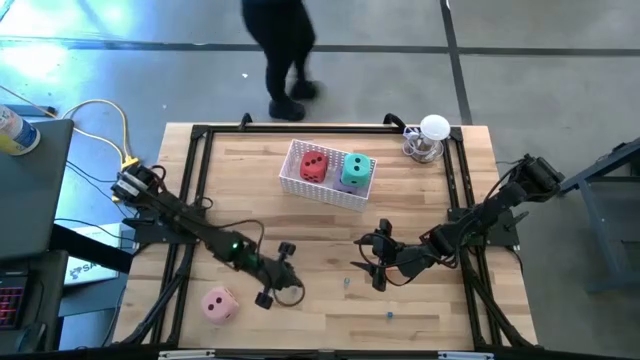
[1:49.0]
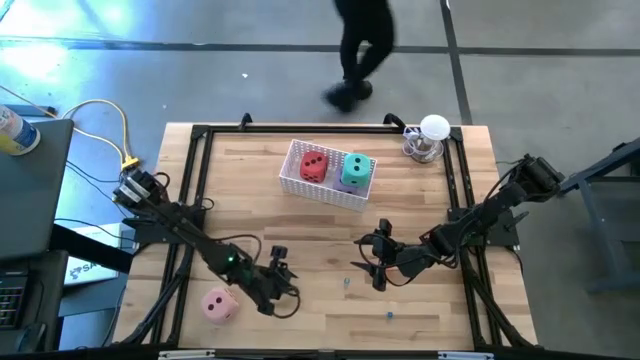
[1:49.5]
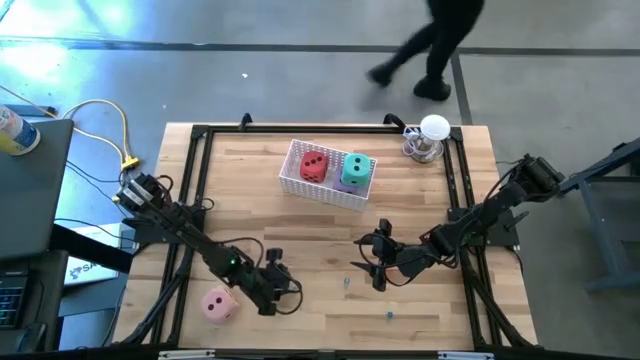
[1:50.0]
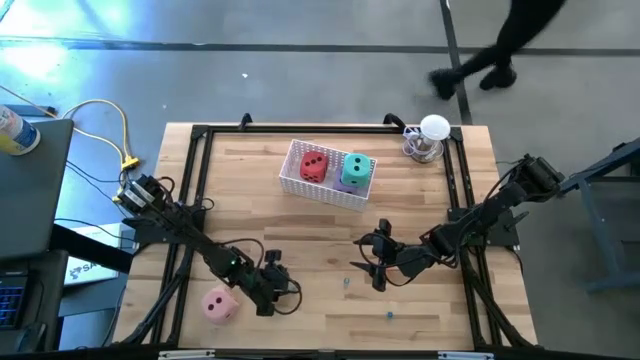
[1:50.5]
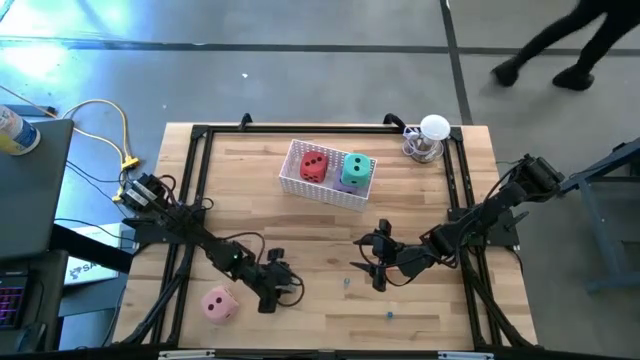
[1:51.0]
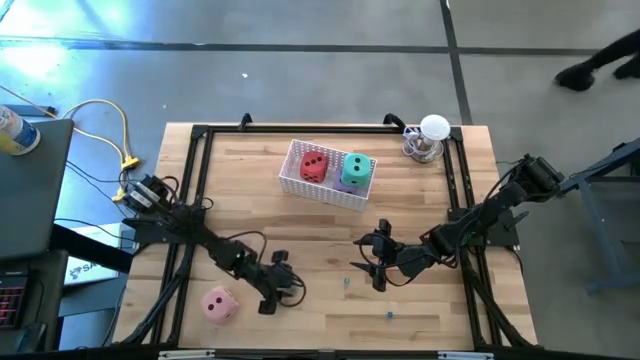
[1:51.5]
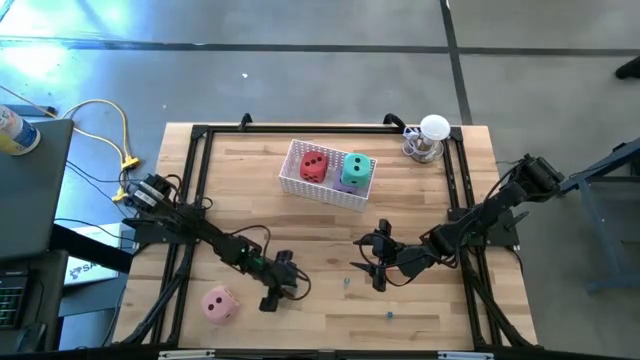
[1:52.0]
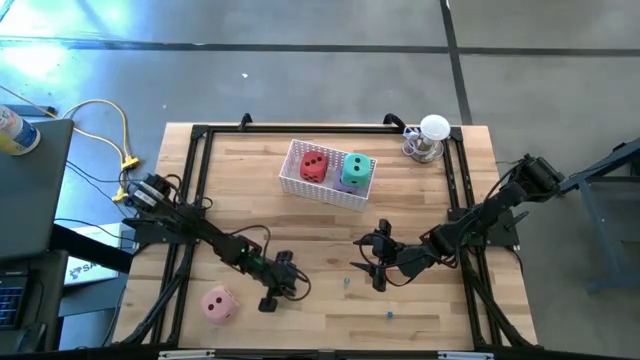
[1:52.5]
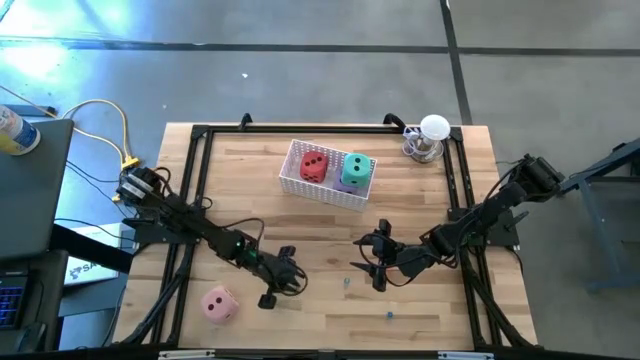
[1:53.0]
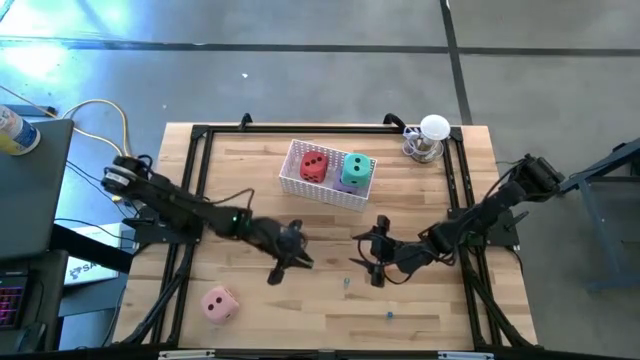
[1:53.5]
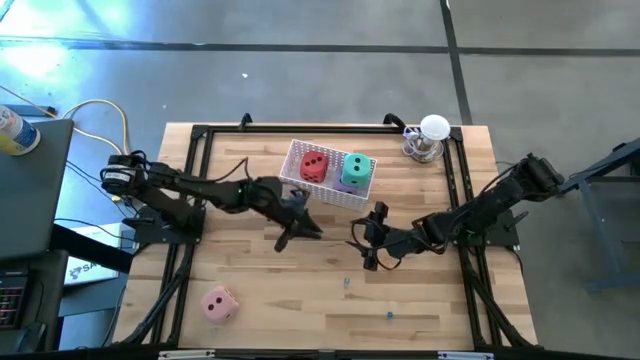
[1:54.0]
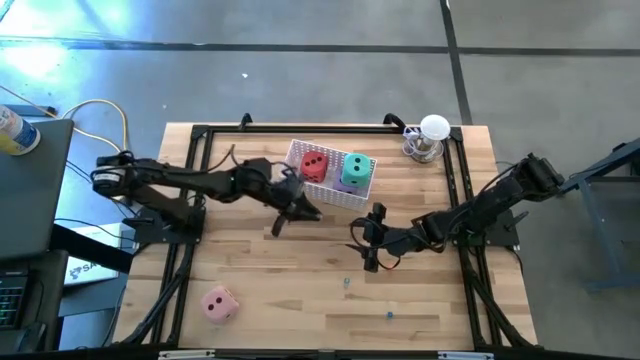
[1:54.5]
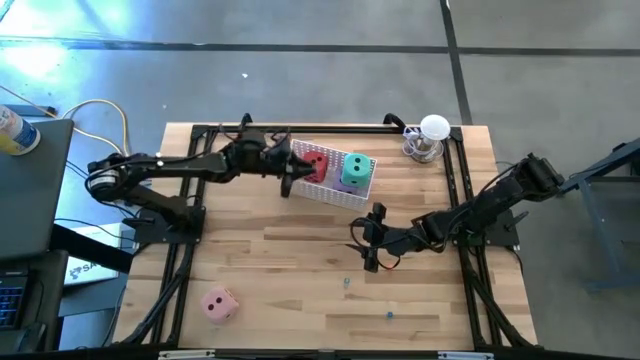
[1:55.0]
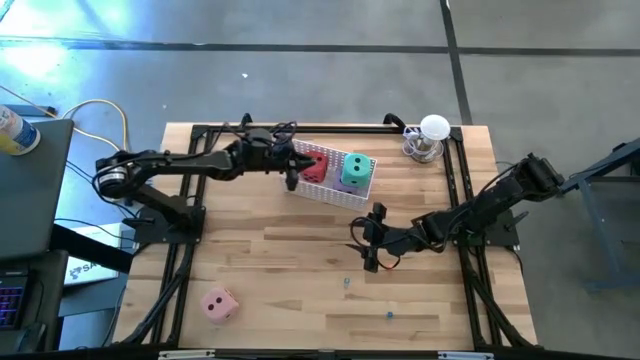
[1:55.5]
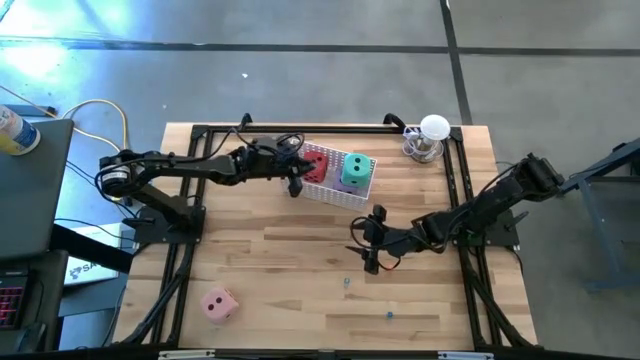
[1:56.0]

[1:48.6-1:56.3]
Task: Pick & Place Dice
Put the small light blue die into the white bin

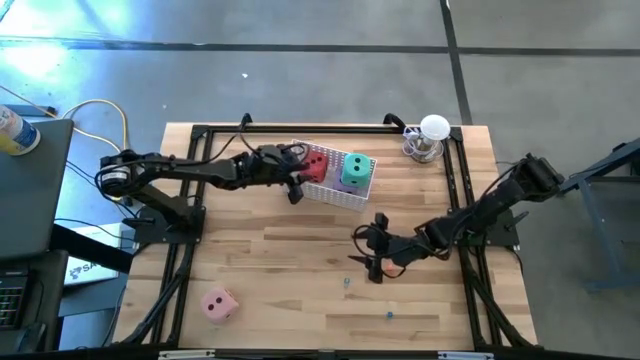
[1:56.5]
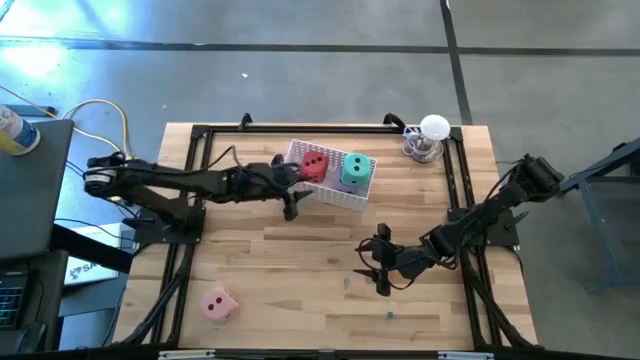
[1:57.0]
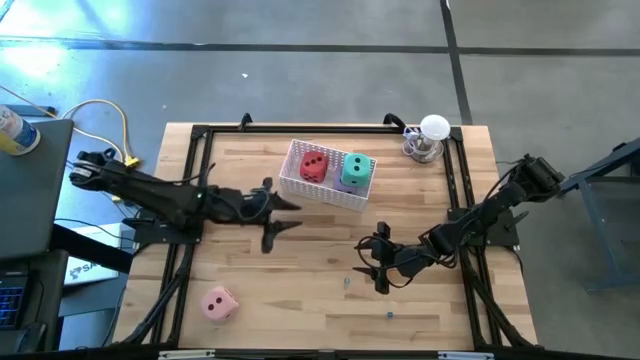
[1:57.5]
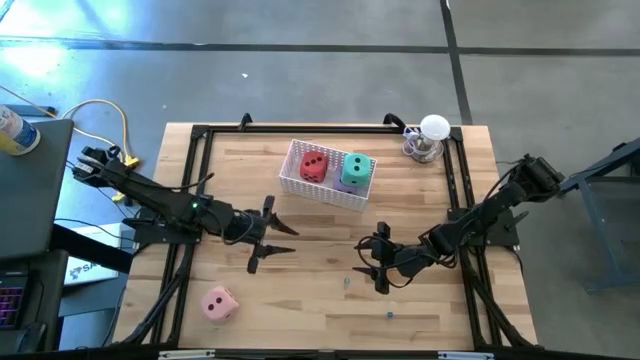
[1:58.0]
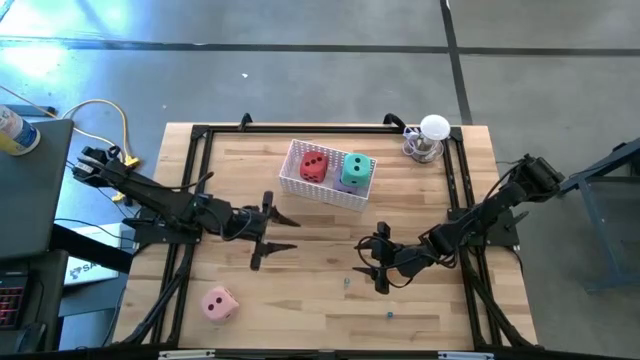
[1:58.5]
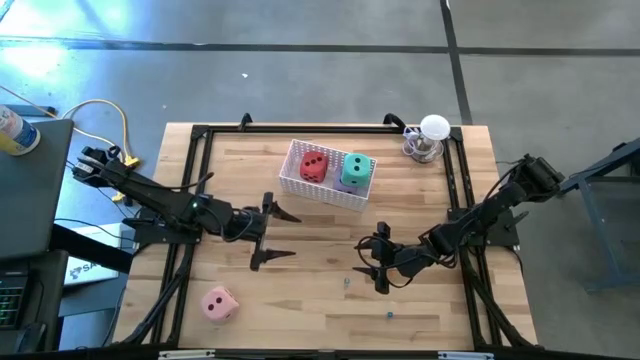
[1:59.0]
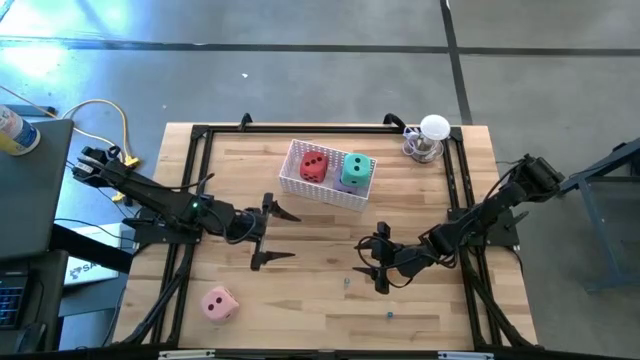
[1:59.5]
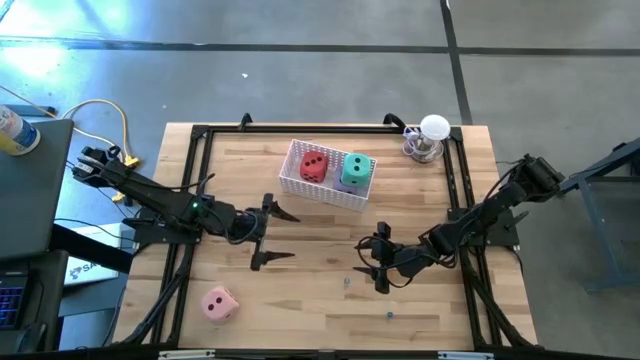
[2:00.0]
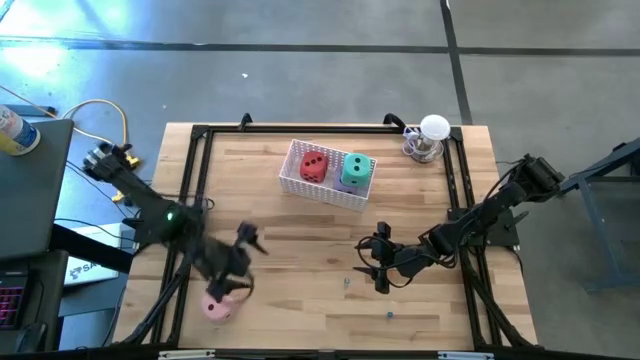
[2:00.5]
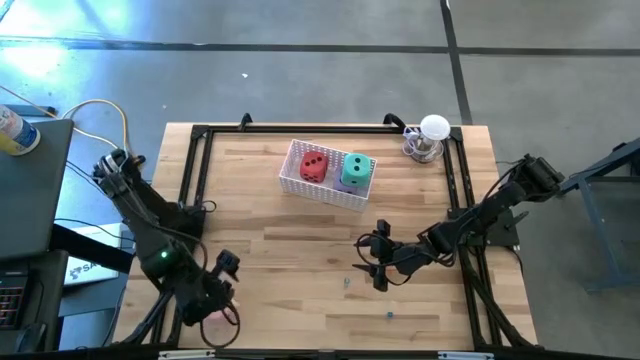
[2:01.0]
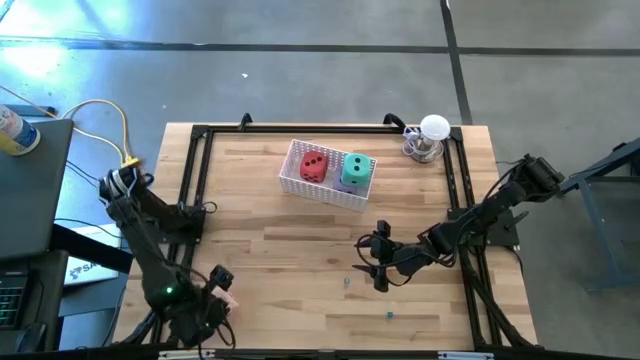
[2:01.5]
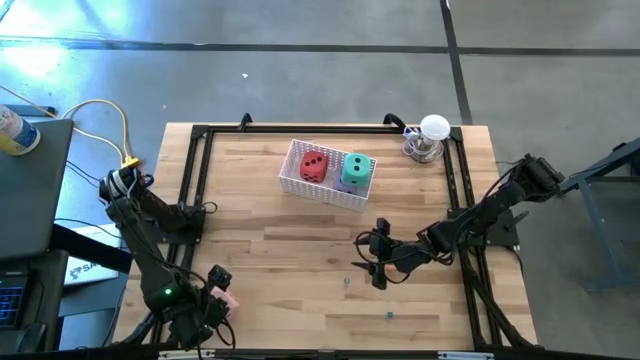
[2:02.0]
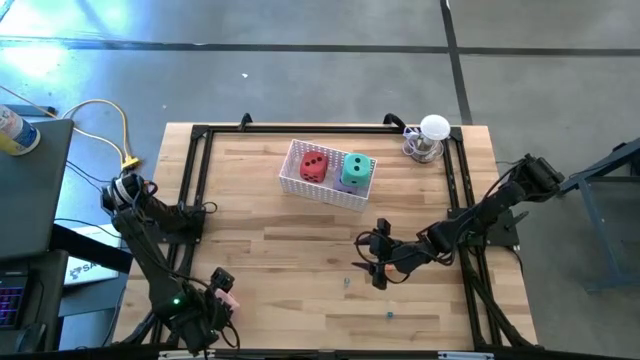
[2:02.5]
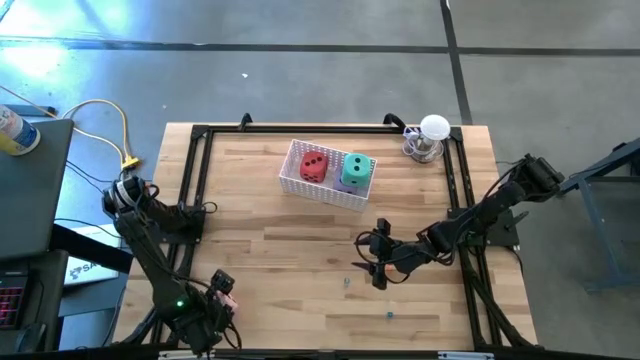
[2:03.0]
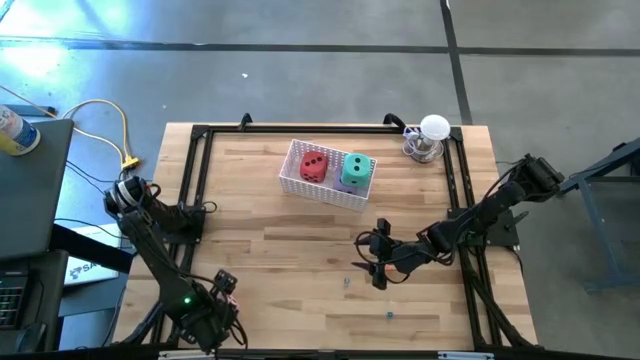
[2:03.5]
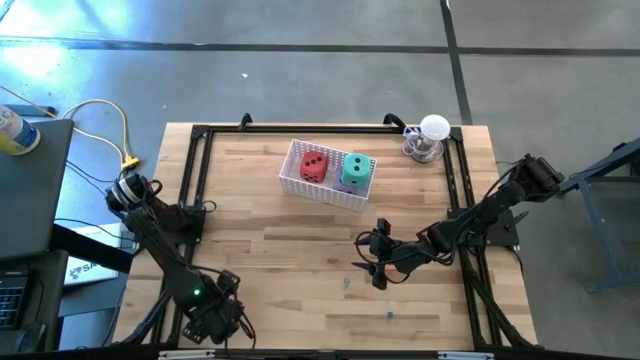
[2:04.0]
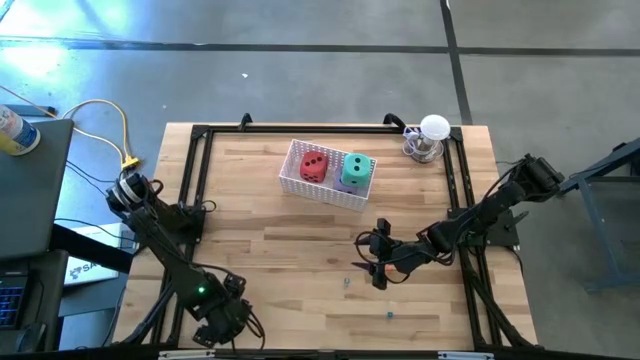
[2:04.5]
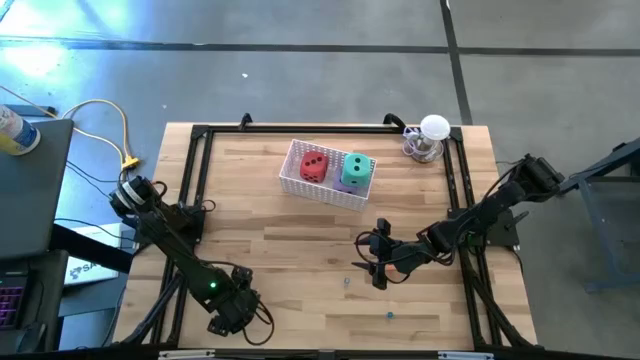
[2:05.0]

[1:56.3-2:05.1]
Put the big pink die into the white bin

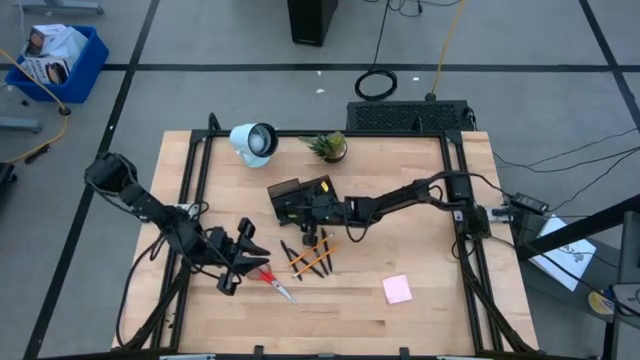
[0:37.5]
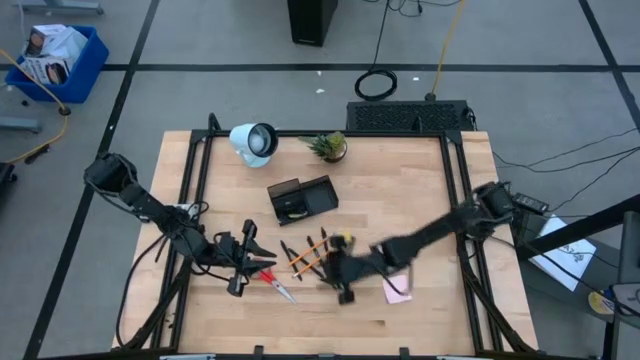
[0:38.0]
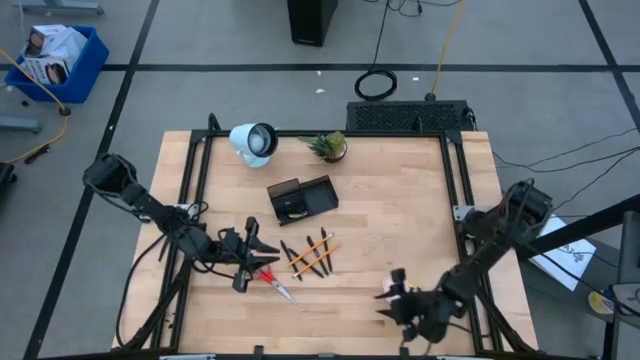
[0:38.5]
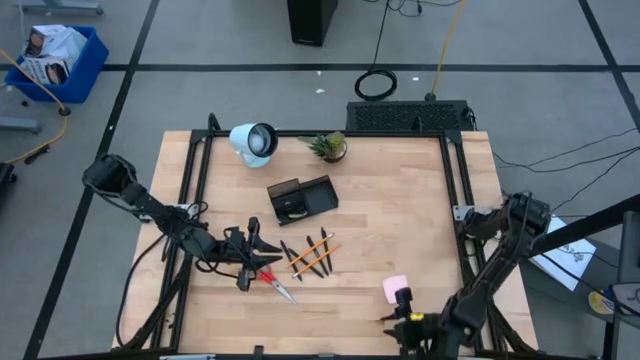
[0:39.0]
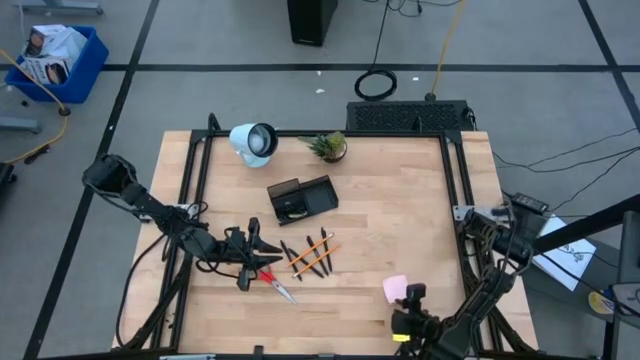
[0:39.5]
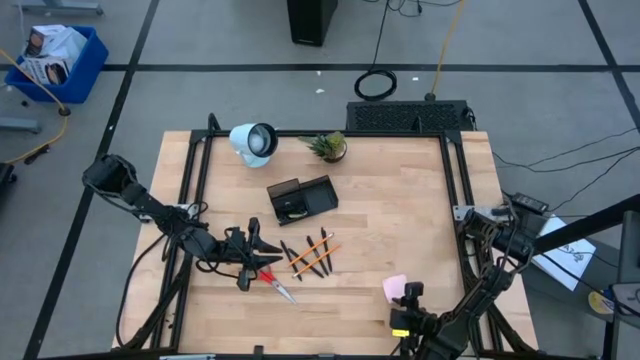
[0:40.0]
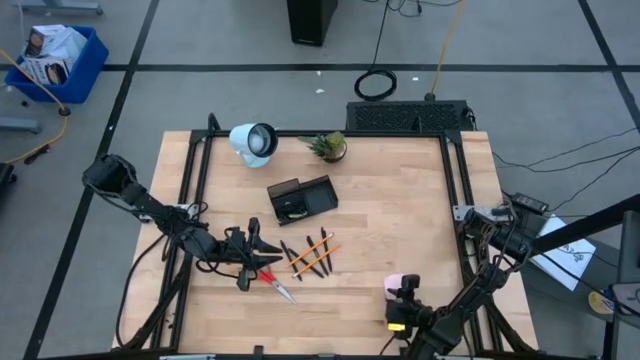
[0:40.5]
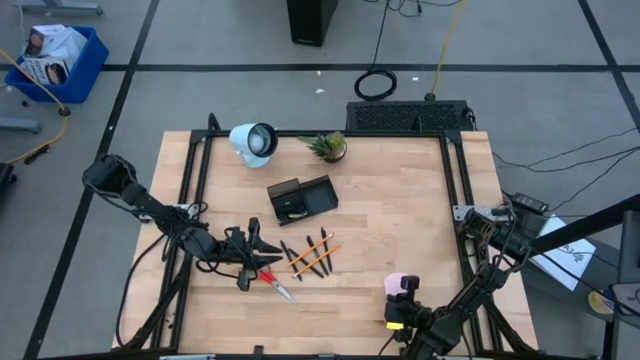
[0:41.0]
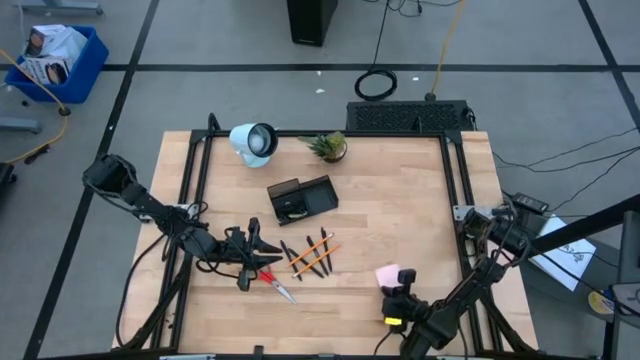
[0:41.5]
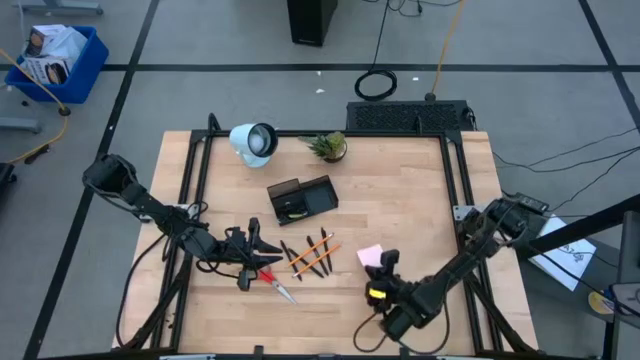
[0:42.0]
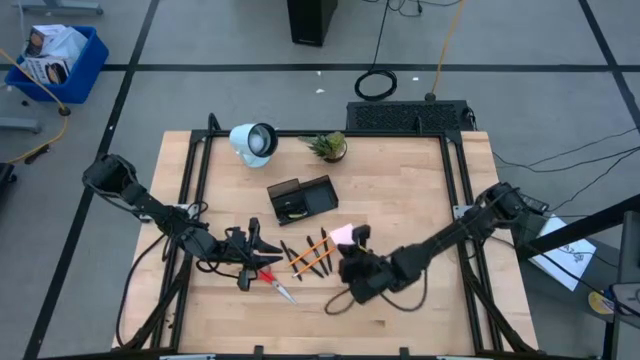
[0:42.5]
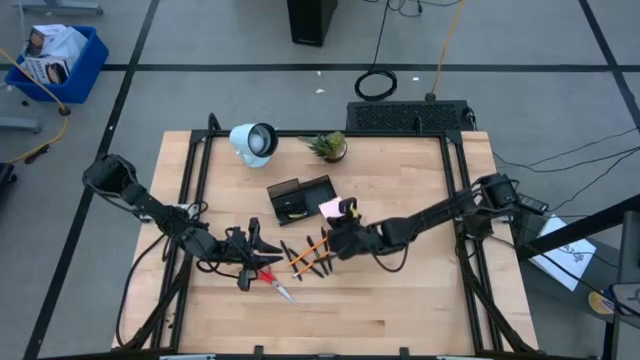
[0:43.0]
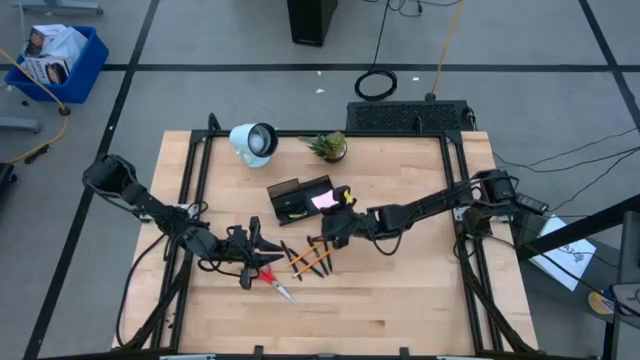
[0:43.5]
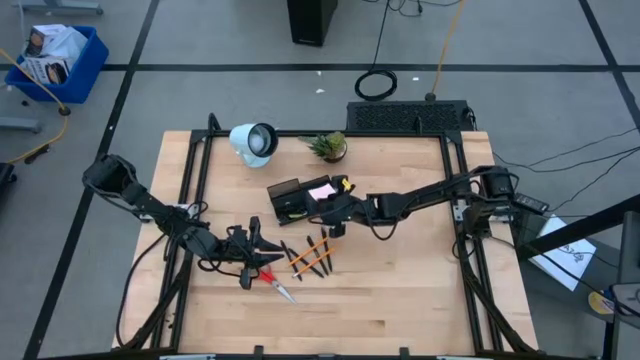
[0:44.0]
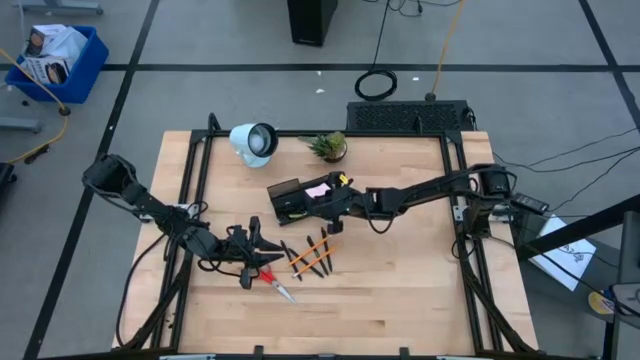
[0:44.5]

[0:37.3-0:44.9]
Task: Pick and place office supplies into organizer
Put the pink sticky notes into the black desk organizer
